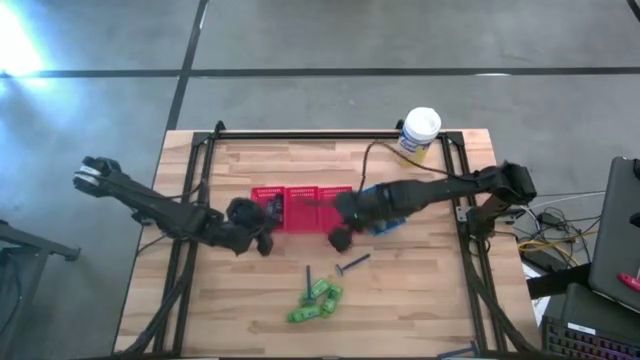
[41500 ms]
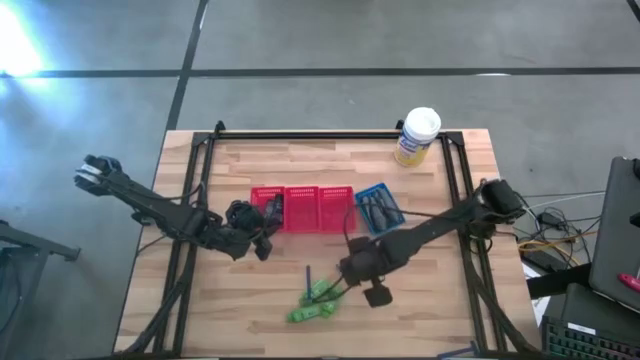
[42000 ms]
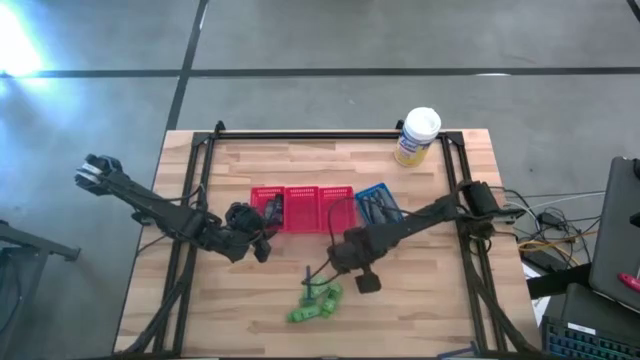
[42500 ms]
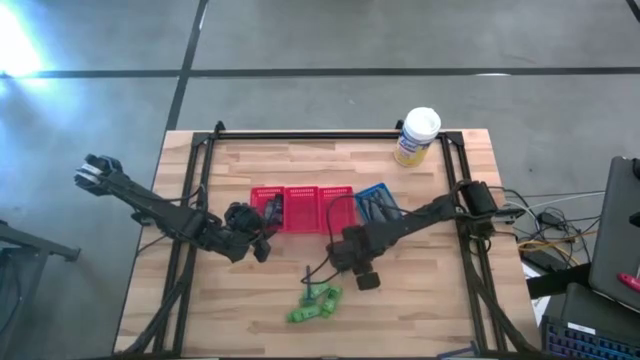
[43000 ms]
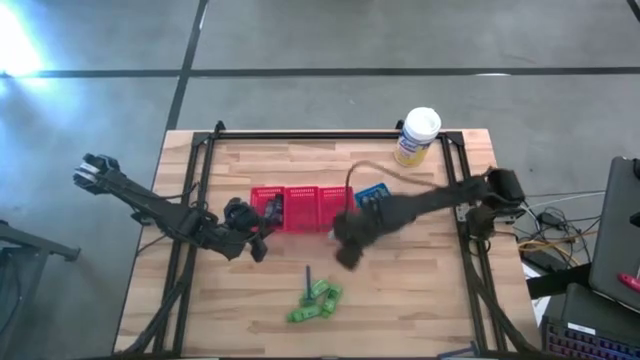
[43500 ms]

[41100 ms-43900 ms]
Task: Pick & Place Travel size toiletries
Put the blue razor into the right red bin

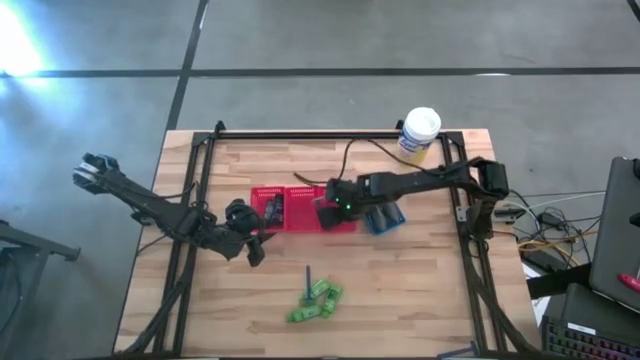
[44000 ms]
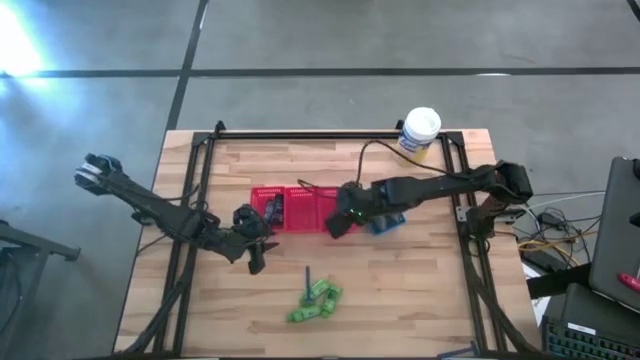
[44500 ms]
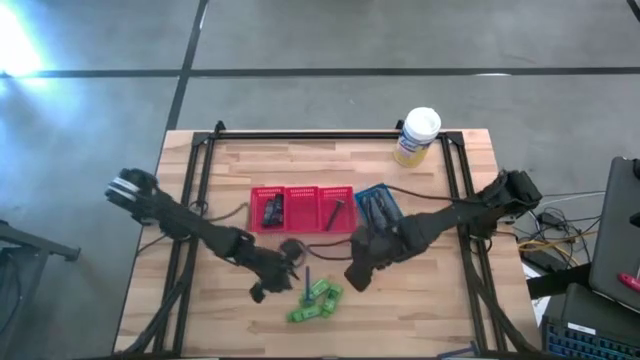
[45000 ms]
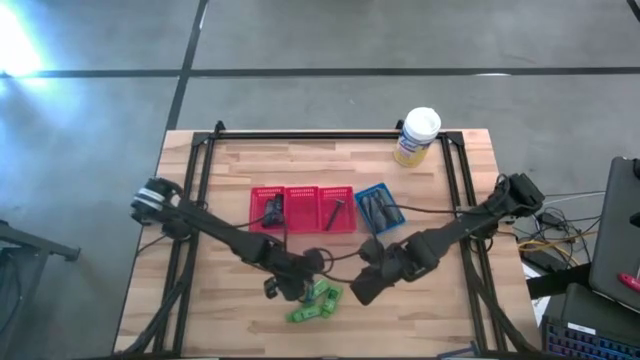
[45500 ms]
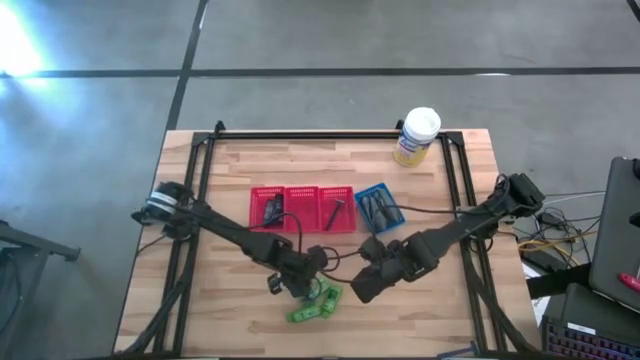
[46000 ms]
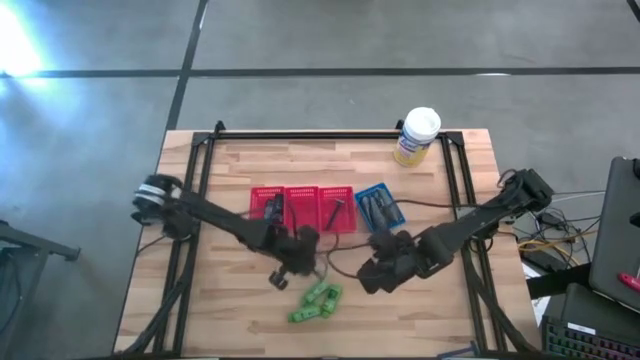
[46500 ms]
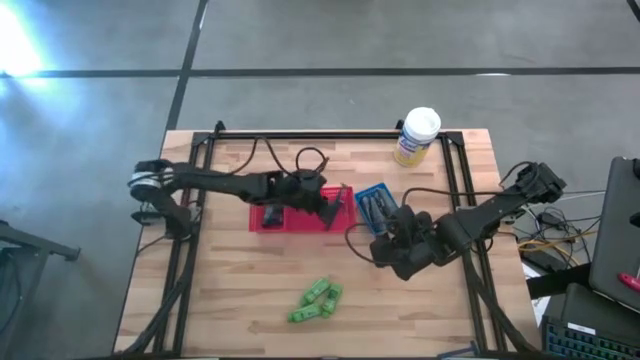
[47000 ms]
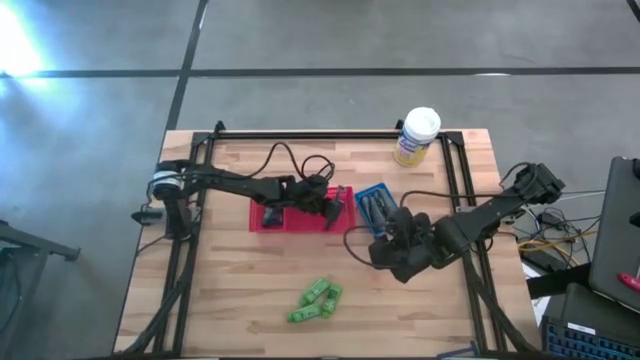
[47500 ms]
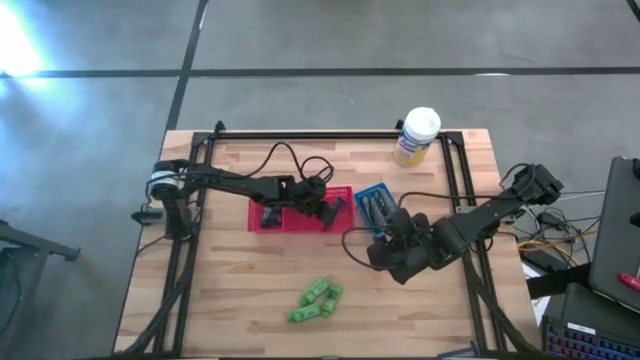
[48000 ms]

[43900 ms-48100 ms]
Put the blue razor into the right red bin

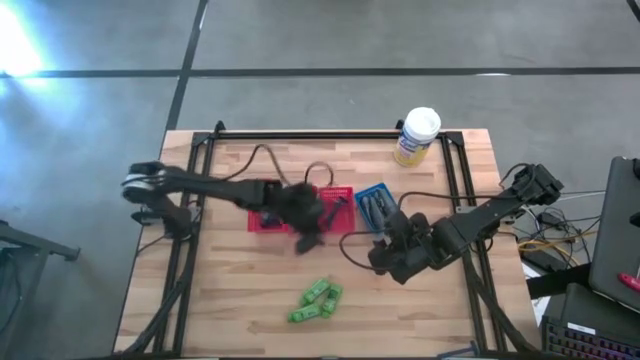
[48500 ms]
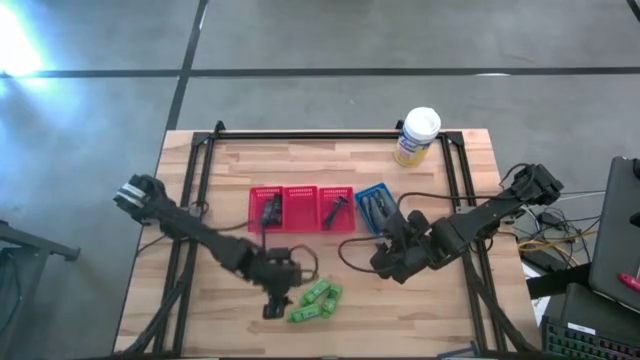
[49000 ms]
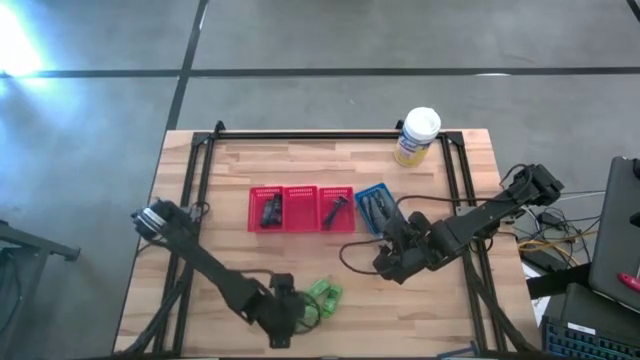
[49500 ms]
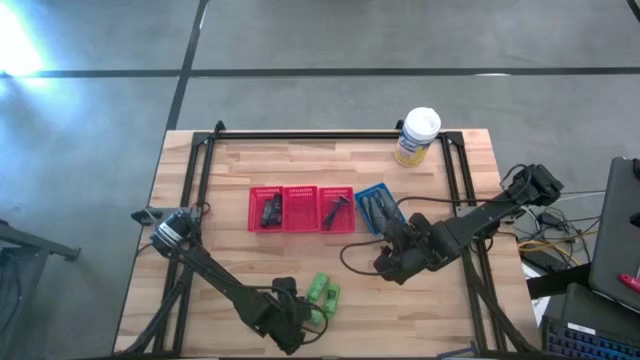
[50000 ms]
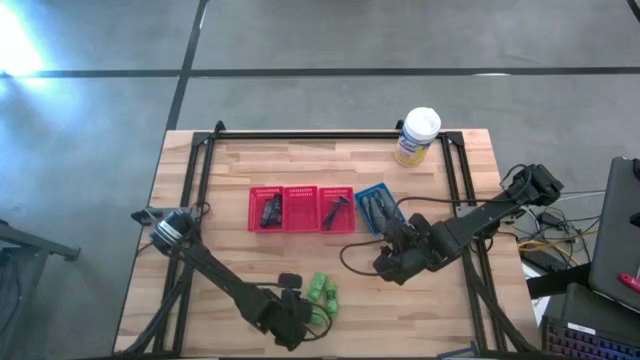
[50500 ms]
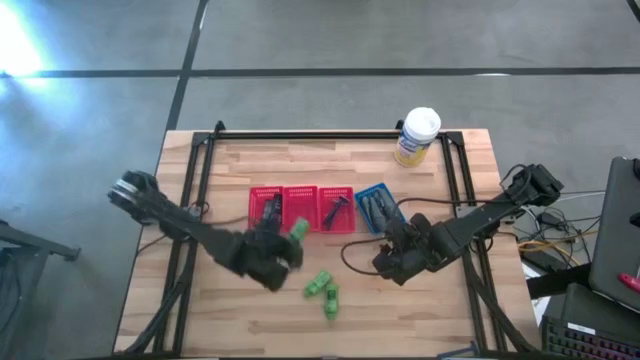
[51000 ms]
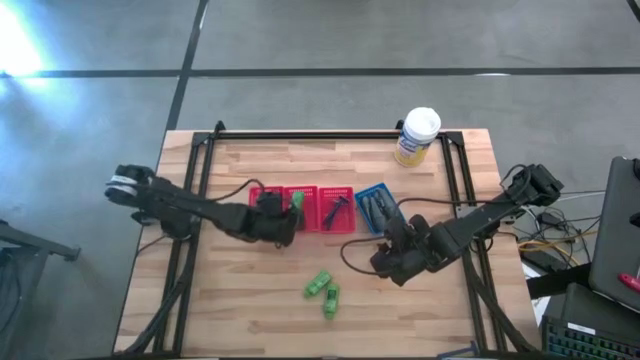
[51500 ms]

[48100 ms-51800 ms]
Put the green shampoo into the middle red bin

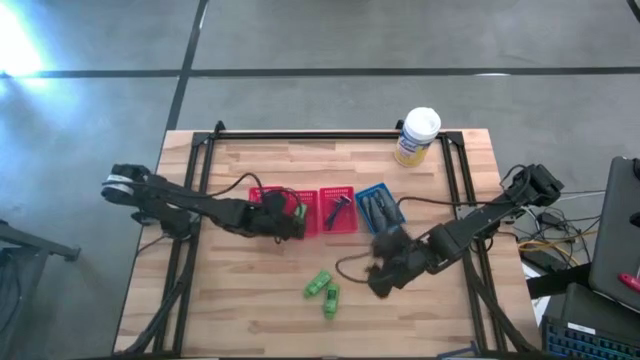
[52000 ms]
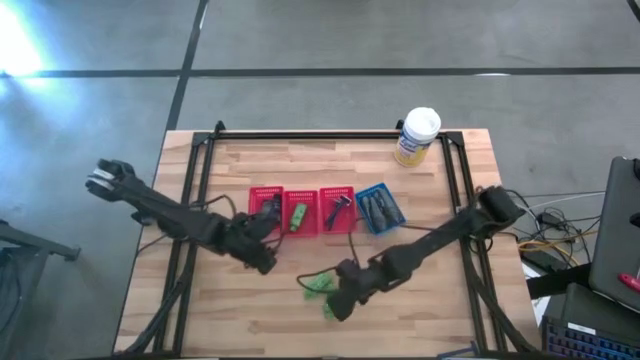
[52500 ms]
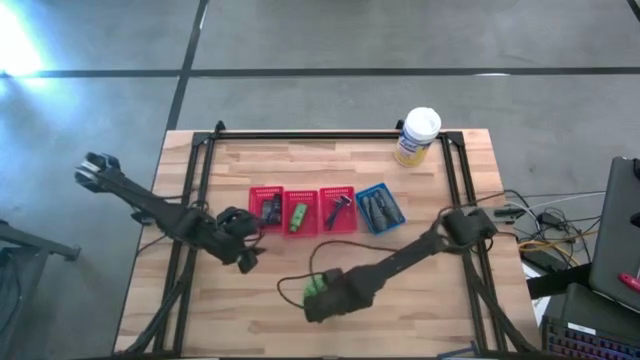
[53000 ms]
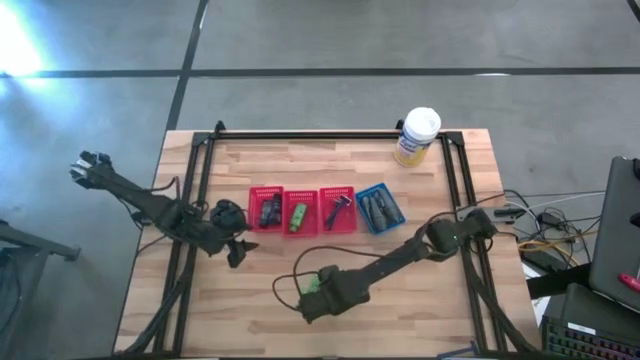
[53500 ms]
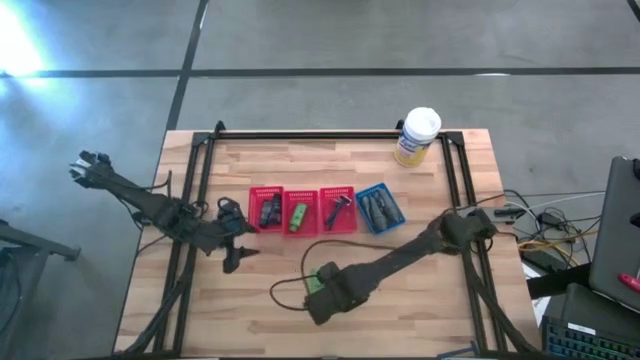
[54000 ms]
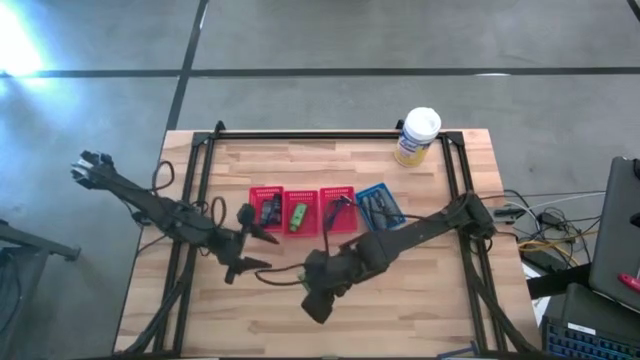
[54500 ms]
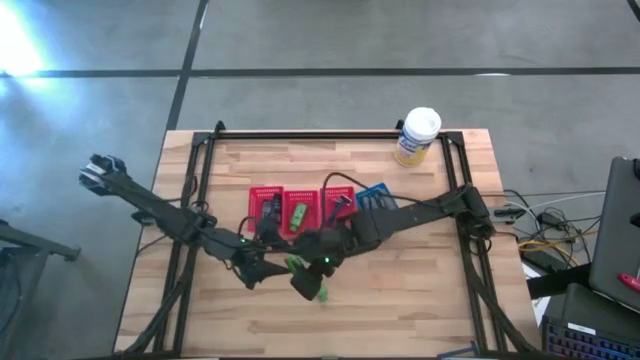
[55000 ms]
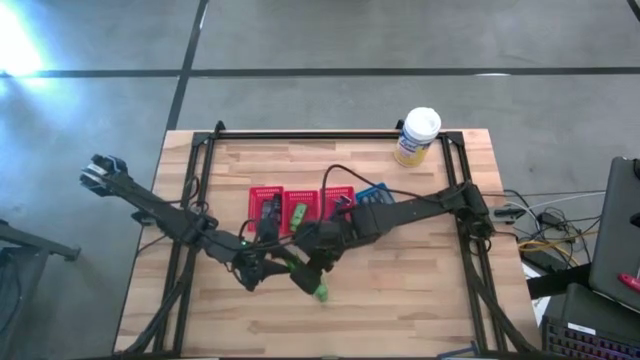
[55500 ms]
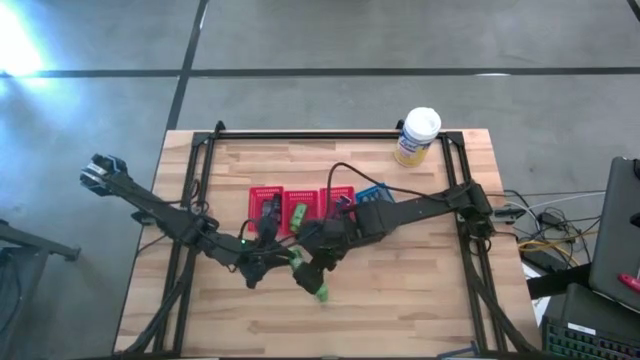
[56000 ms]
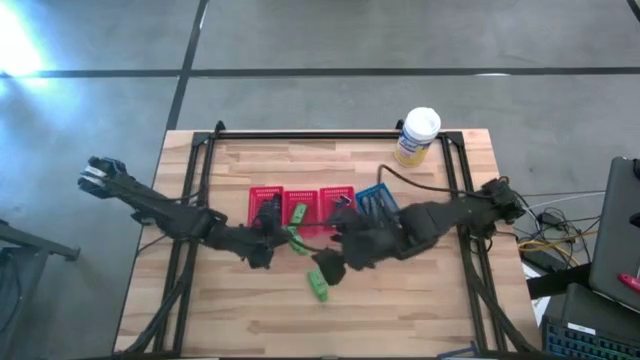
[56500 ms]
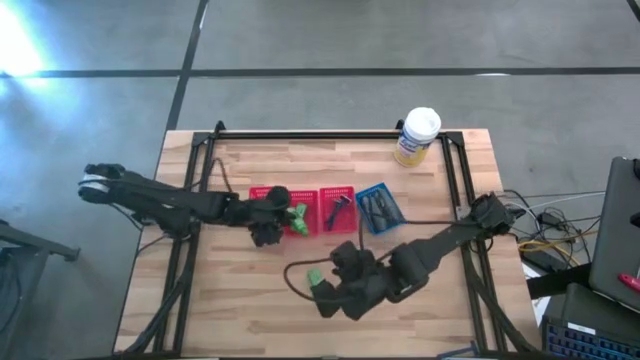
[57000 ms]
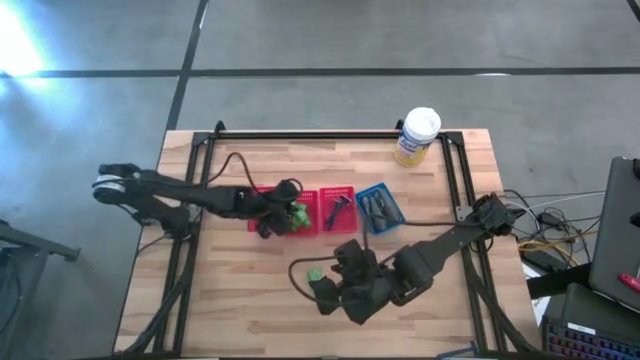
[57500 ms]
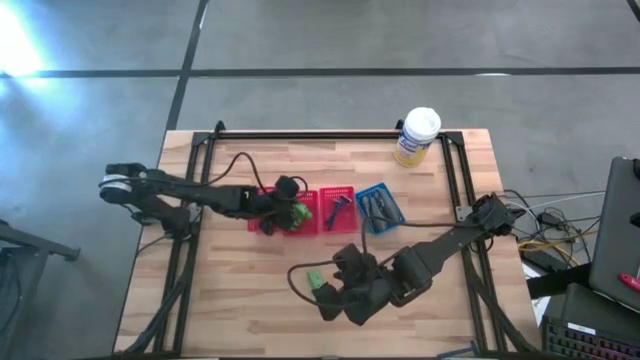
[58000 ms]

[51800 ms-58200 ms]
Put the green shampoo into the middle red bin

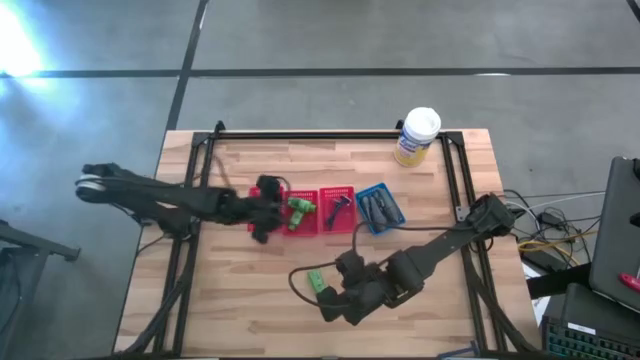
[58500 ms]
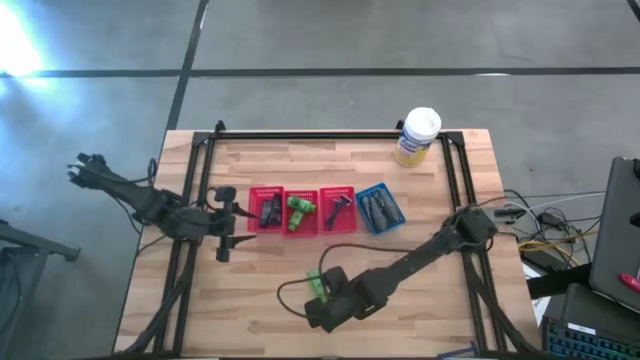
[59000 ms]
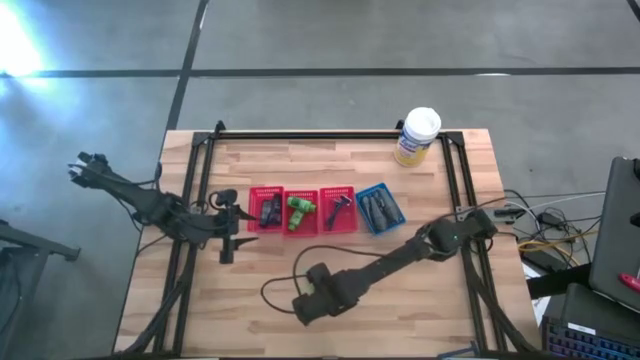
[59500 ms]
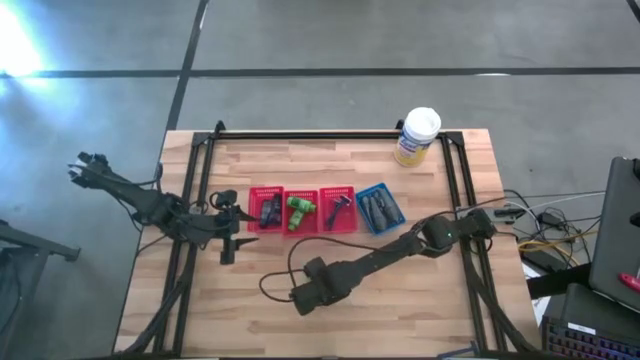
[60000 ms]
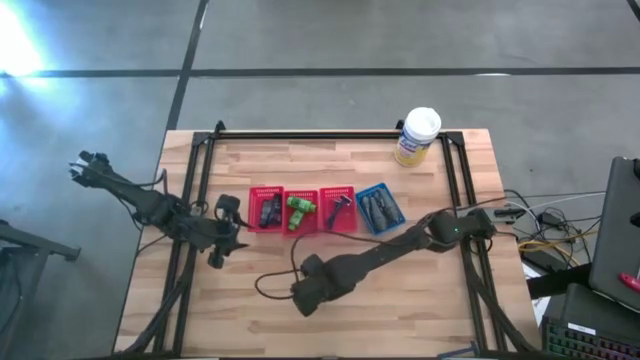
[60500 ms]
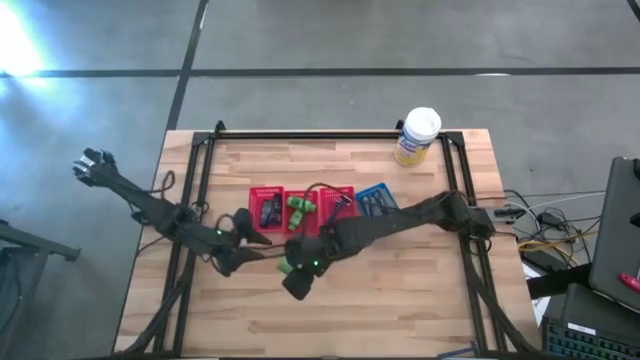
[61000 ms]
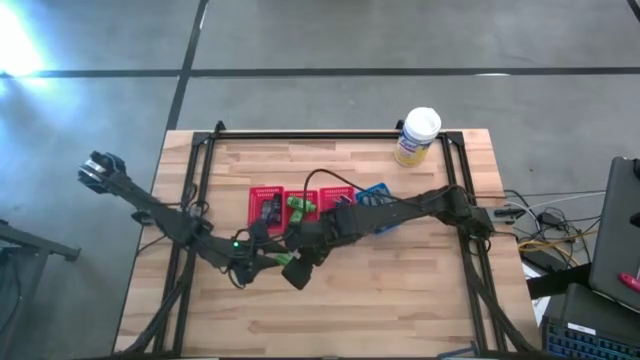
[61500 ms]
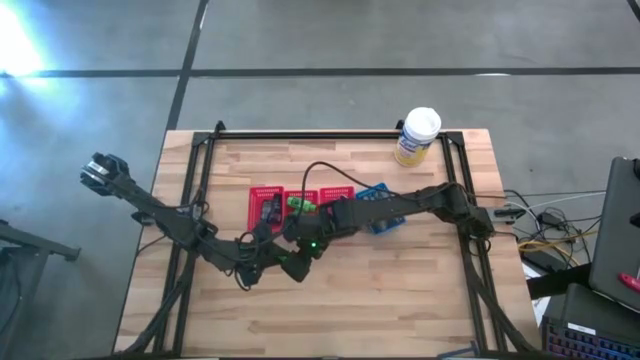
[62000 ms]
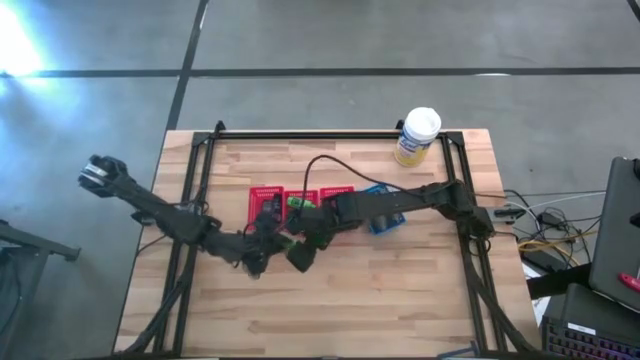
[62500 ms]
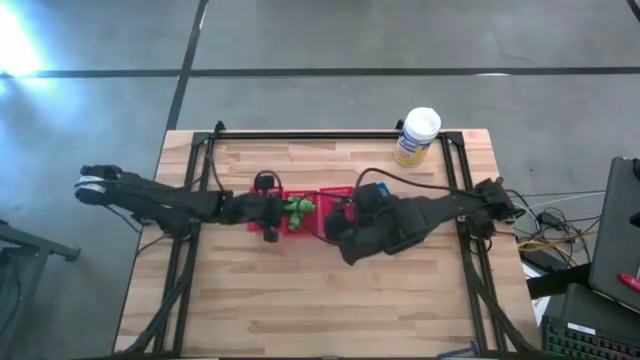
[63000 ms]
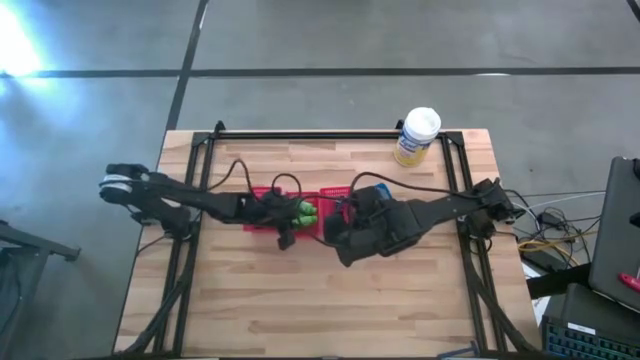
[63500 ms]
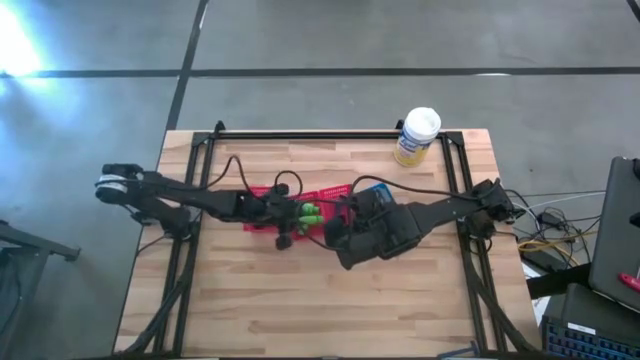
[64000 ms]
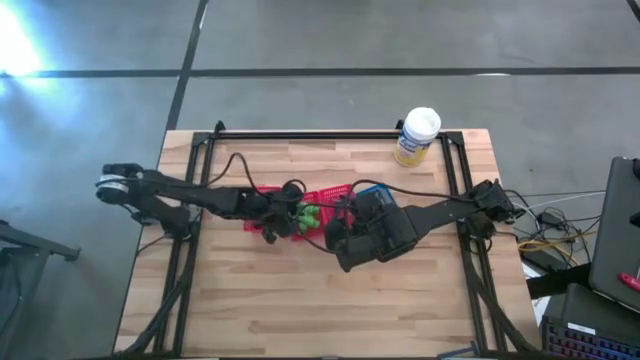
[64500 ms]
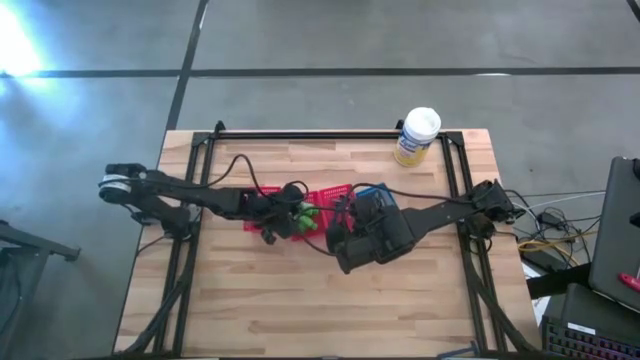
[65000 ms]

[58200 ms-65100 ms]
Put the green shampoo into the middle red bin
